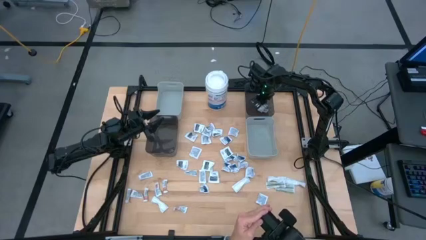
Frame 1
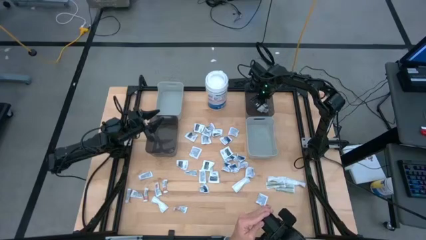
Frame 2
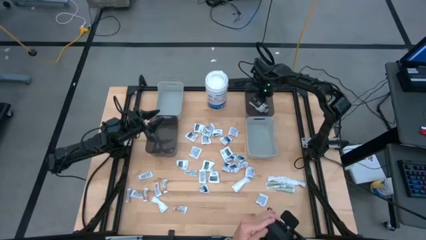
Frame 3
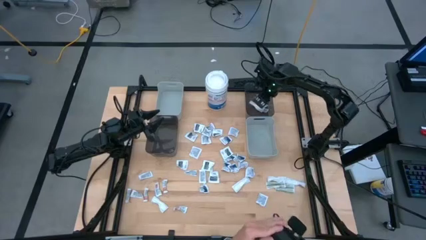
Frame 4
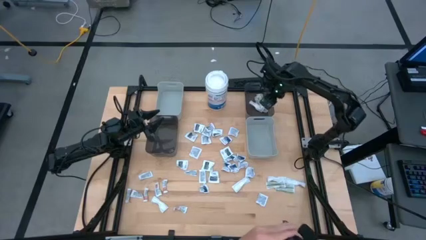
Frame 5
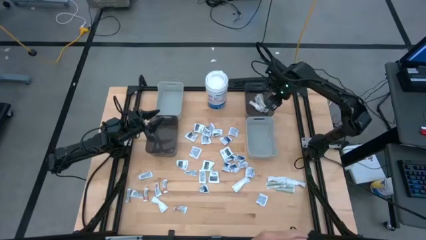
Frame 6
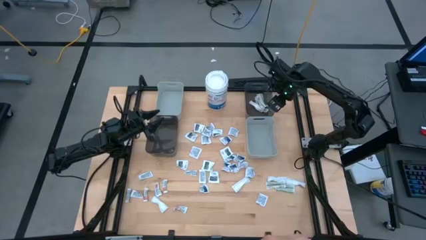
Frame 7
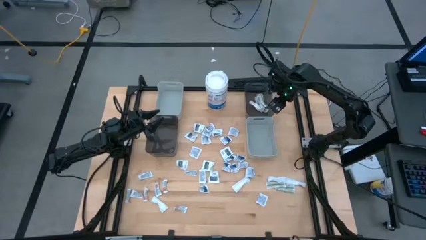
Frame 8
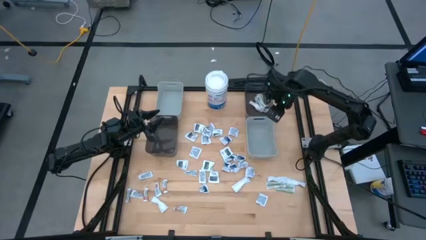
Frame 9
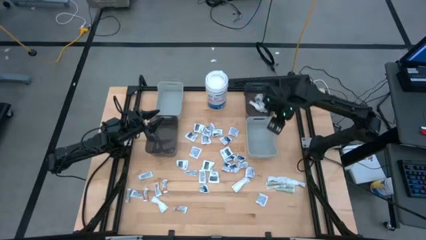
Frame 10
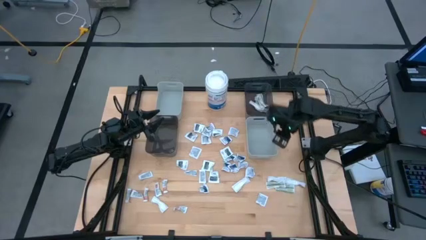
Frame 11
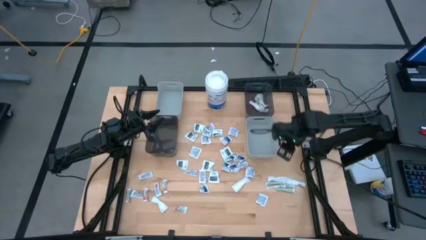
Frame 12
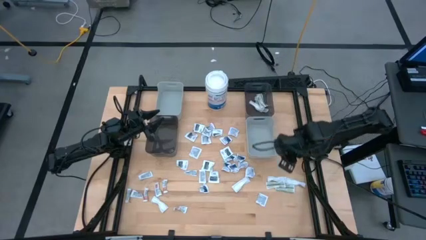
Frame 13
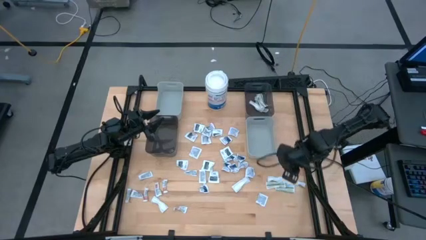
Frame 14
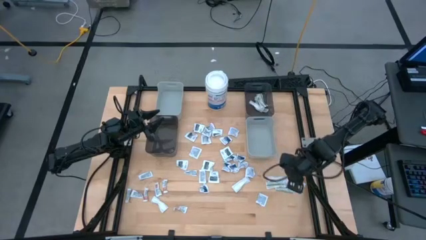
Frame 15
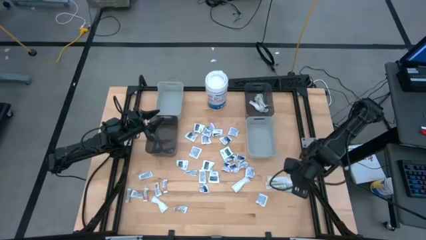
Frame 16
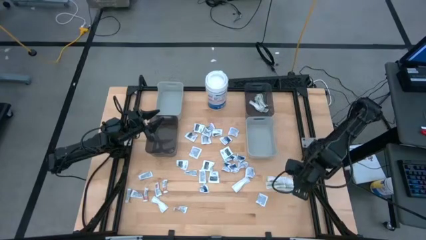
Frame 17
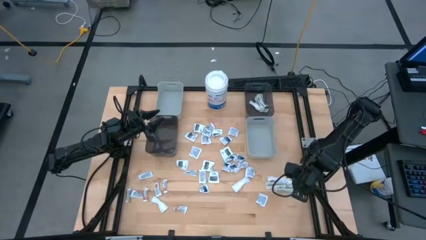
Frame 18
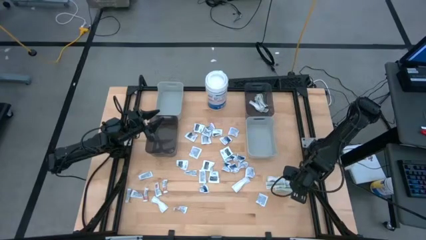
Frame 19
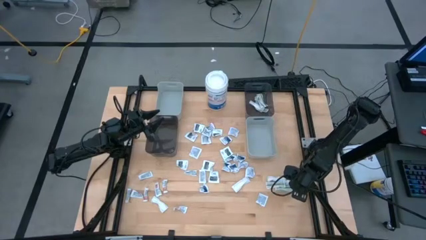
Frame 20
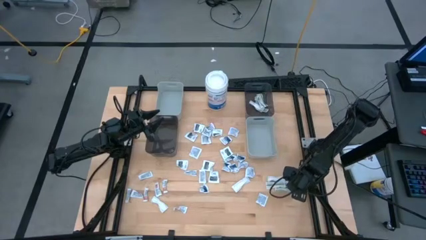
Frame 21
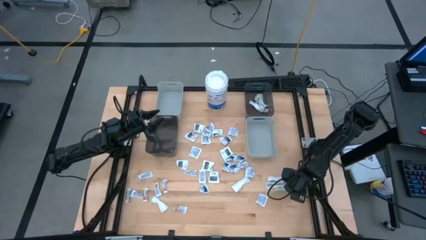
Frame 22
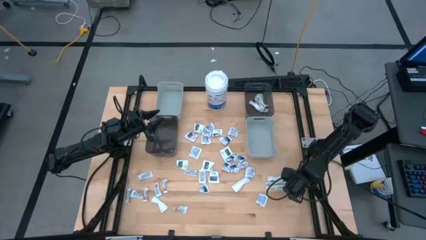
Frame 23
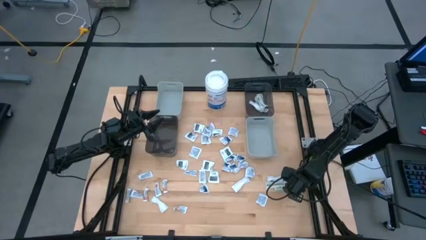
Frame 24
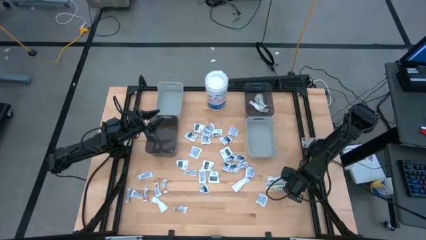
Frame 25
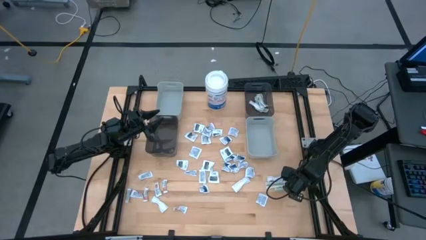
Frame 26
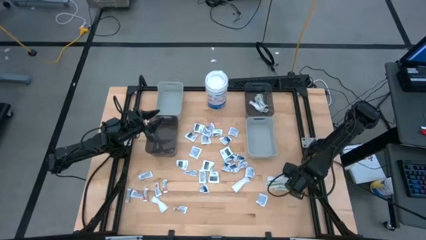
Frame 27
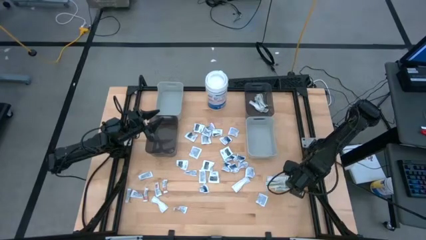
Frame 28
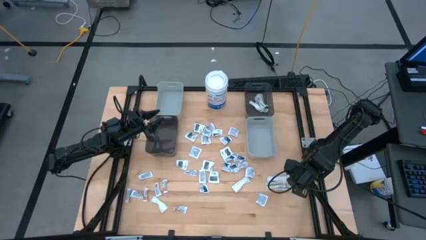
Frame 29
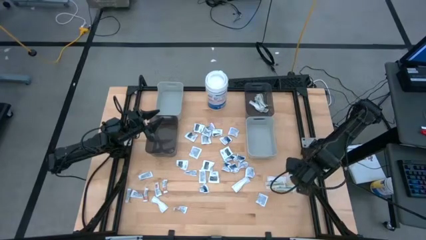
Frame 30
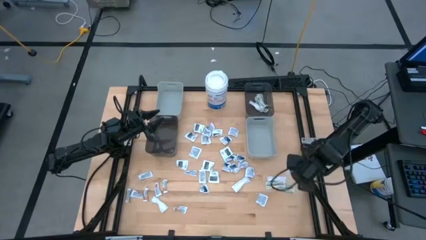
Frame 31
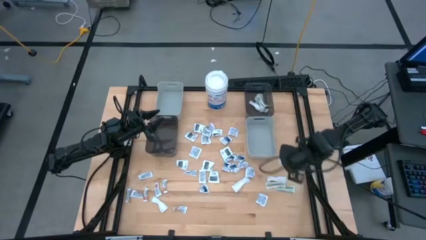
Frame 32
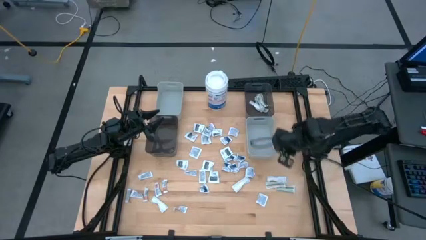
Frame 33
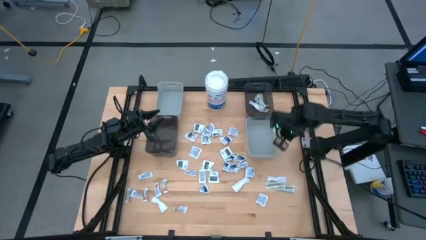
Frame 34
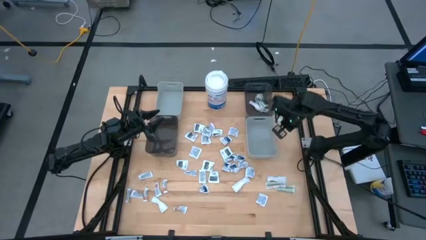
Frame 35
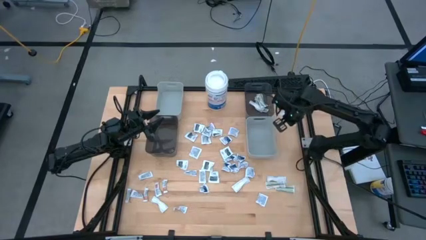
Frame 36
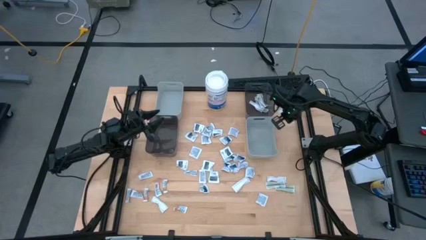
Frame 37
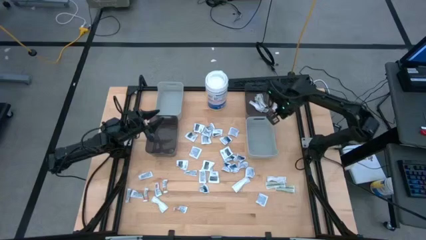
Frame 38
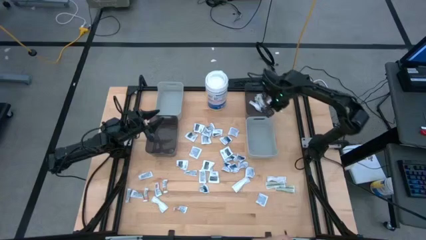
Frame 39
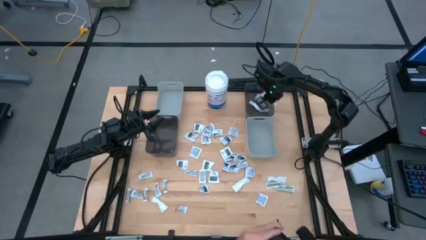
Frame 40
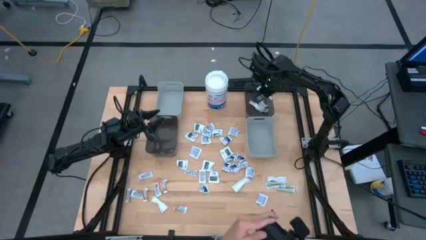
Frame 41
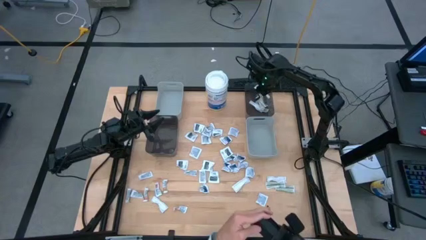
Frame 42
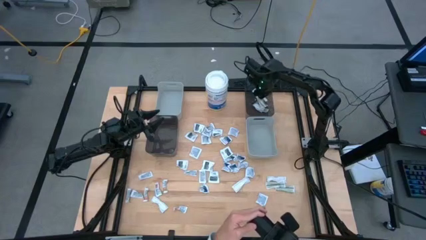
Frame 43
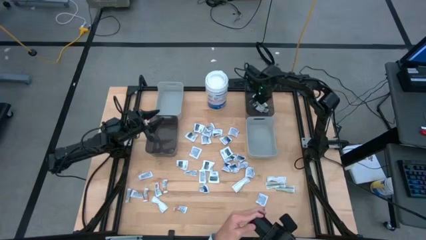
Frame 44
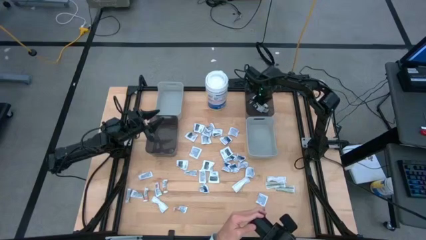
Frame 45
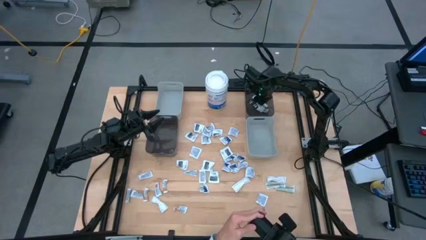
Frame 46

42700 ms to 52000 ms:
Task: Pick & Place First Aid Supplies
Put the green bandage into the right black bin

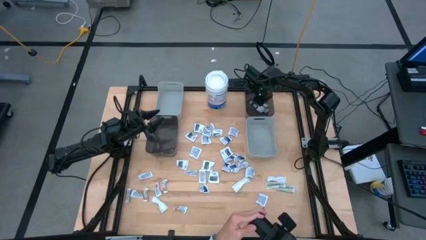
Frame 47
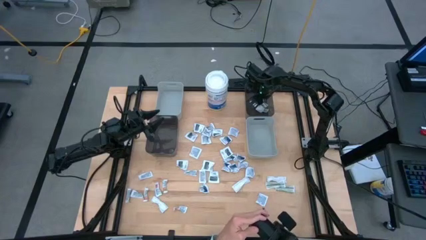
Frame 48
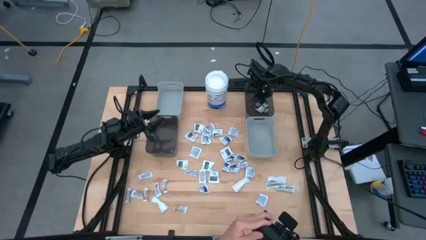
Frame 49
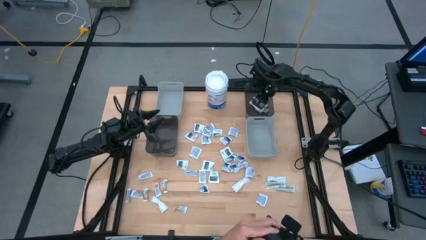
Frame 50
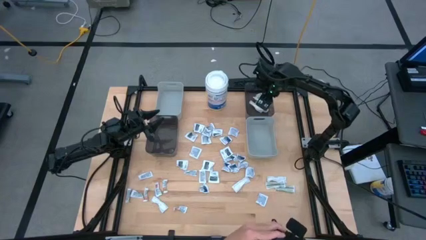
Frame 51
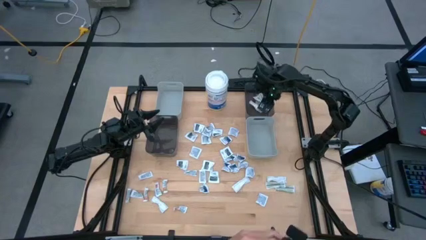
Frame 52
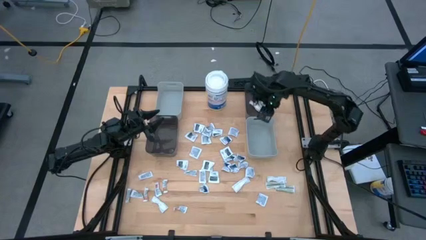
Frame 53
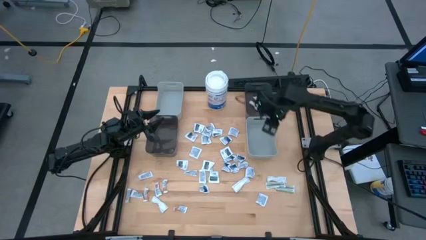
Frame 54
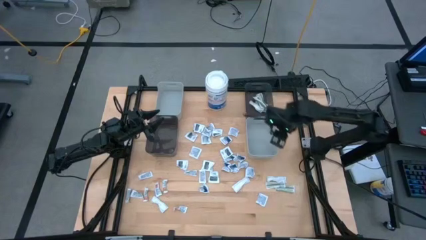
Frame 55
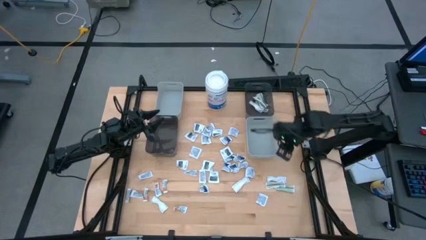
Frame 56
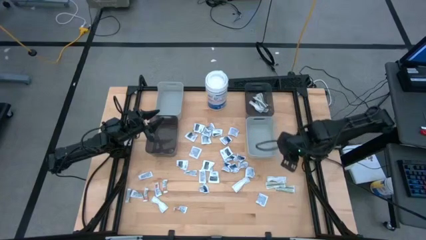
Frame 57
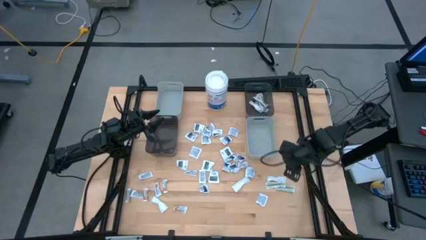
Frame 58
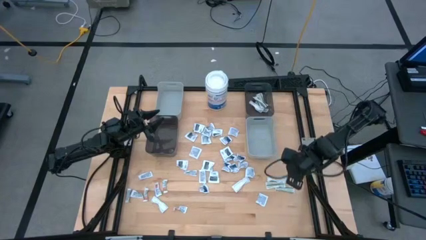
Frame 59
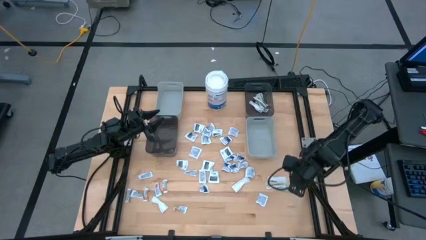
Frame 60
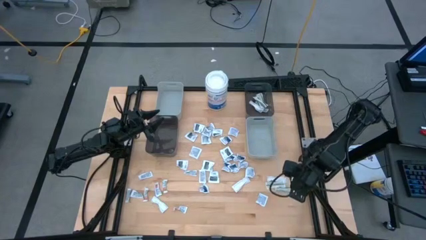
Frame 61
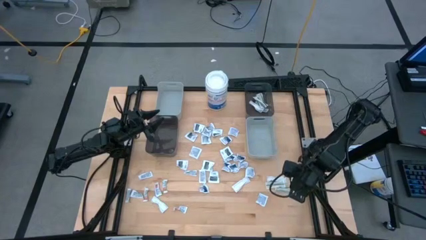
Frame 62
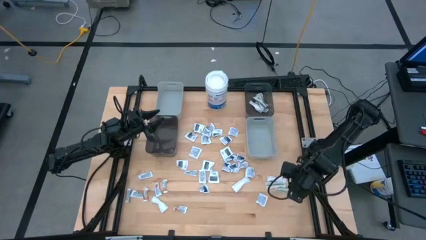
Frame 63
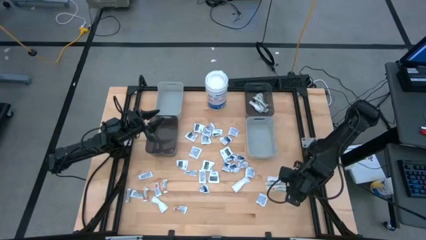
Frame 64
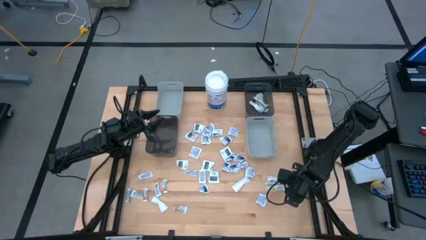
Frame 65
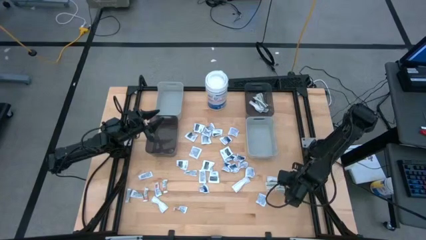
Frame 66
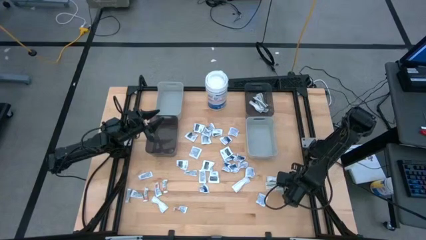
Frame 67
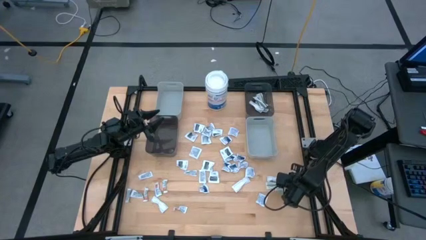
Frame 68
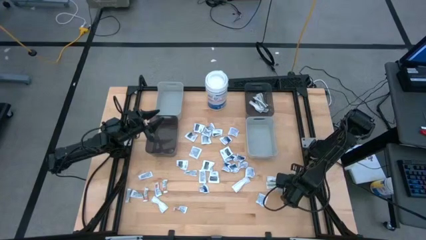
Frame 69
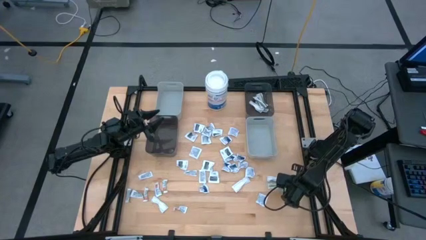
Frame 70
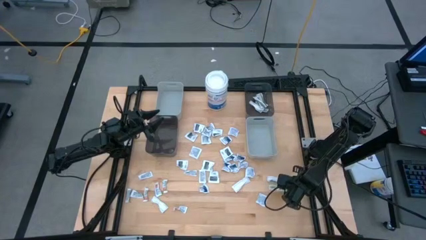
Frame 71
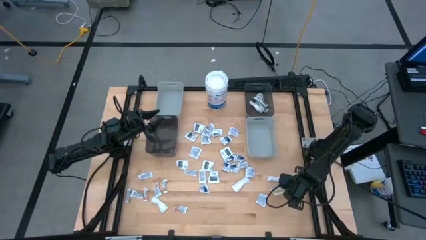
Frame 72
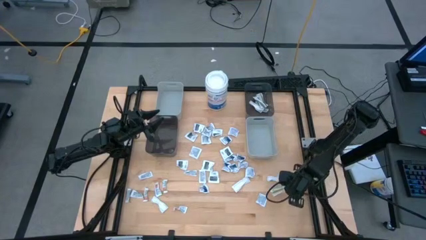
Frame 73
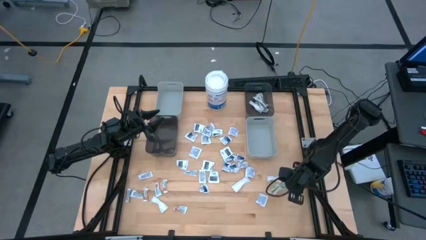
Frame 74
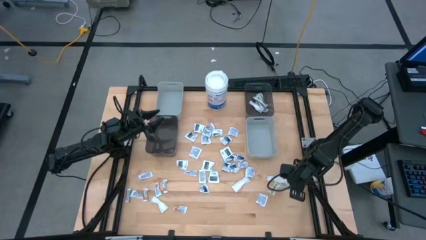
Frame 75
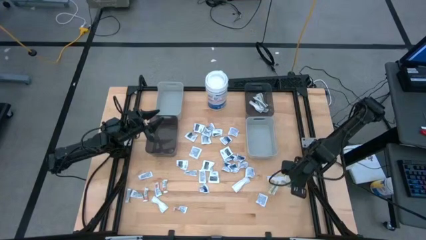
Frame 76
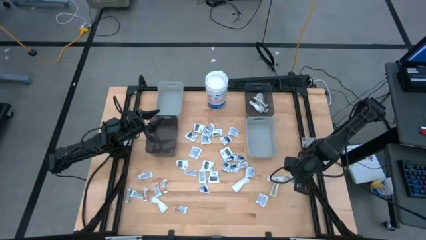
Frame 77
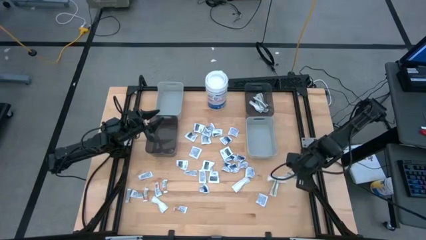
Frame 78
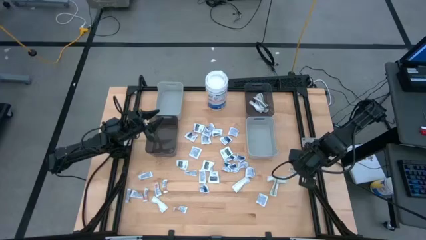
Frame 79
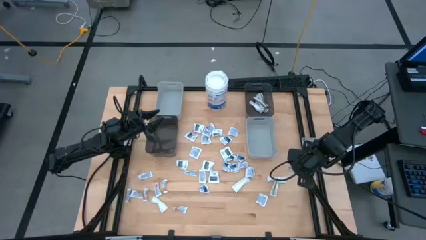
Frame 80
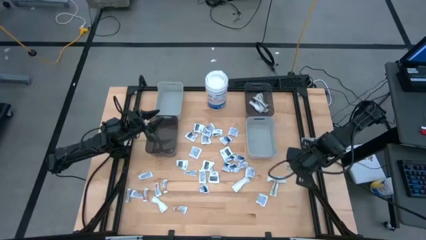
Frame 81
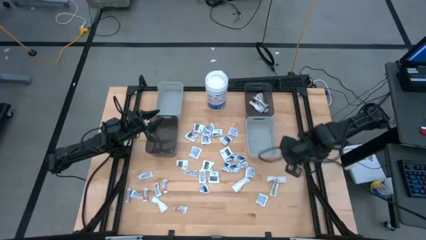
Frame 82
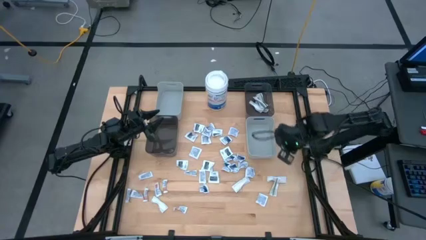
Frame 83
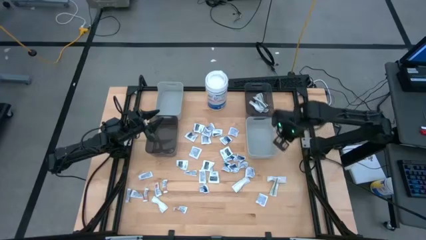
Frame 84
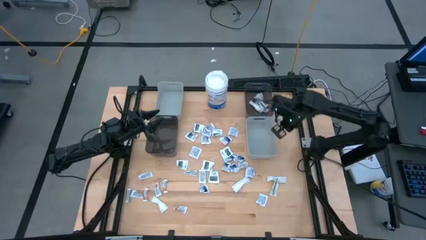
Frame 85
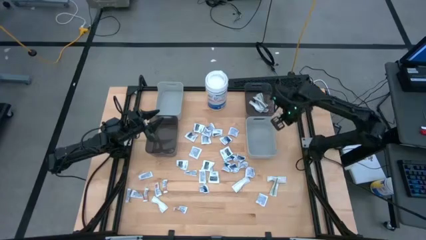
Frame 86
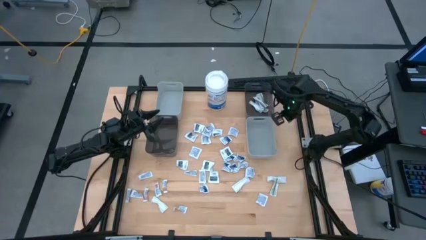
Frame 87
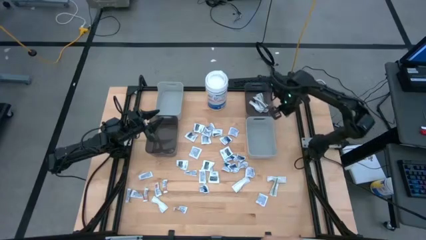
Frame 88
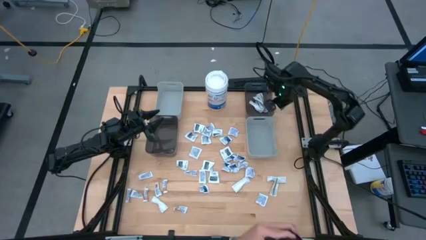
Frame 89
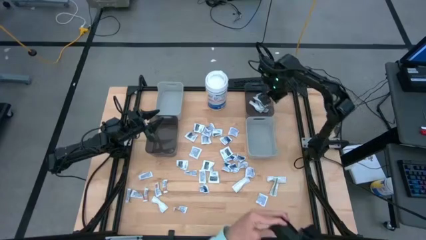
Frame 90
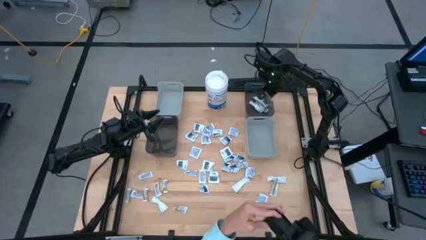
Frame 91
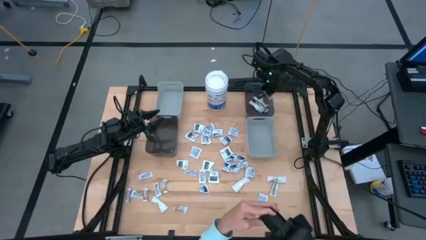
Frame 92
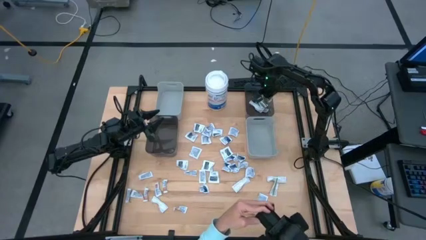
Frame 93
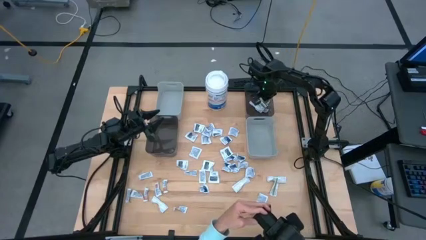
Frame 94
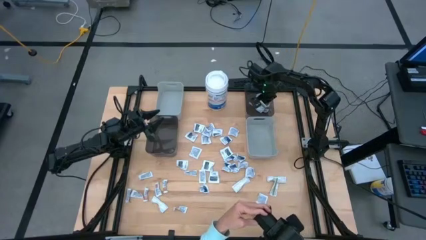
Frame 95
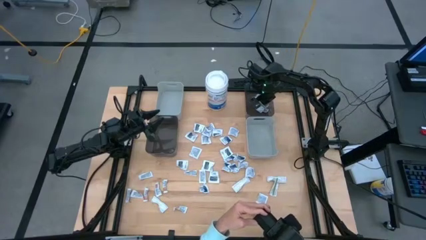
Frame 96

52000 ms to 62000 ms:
Put the green bandage into the right black bin
